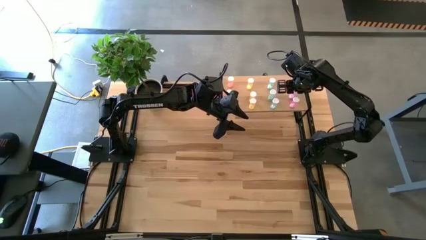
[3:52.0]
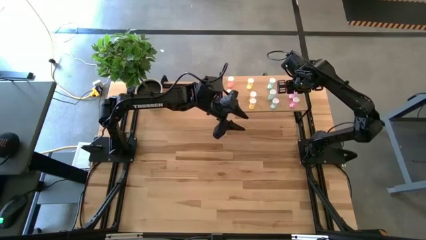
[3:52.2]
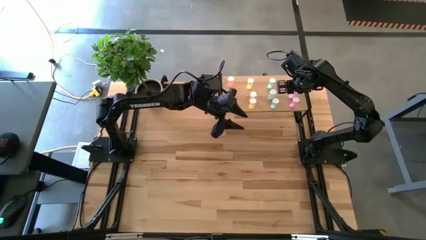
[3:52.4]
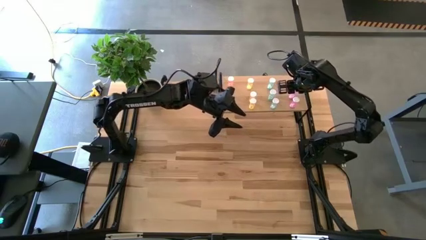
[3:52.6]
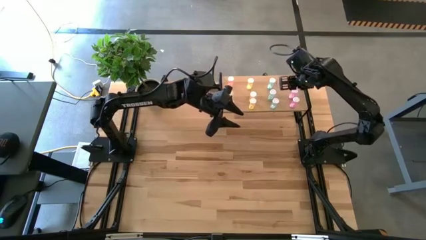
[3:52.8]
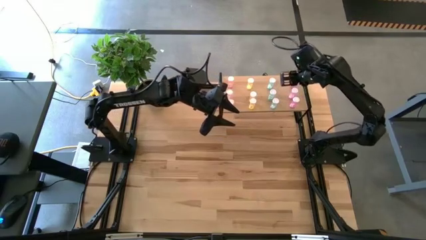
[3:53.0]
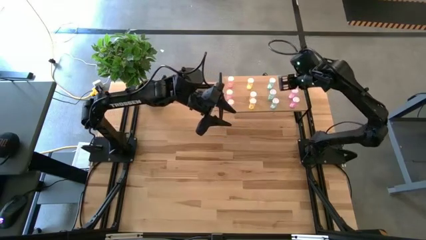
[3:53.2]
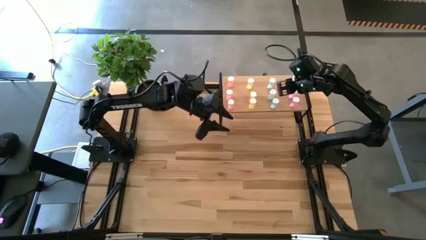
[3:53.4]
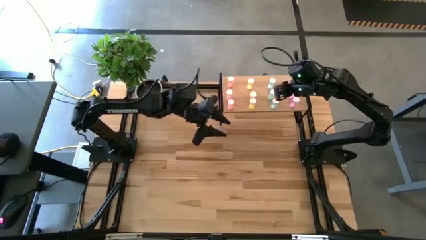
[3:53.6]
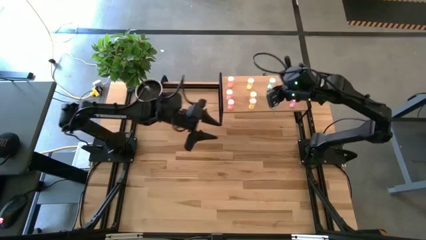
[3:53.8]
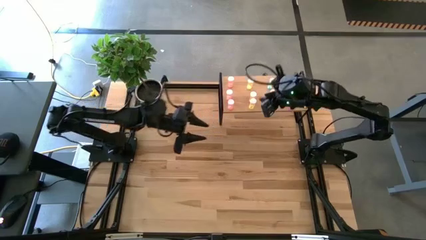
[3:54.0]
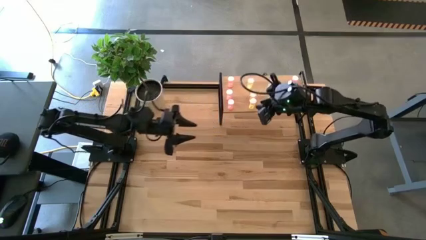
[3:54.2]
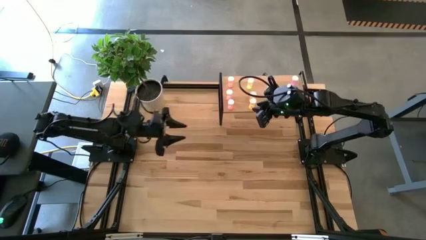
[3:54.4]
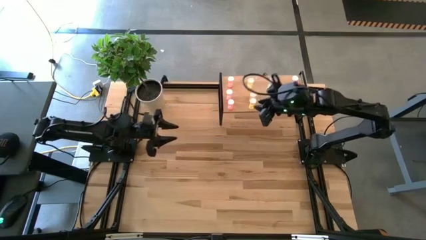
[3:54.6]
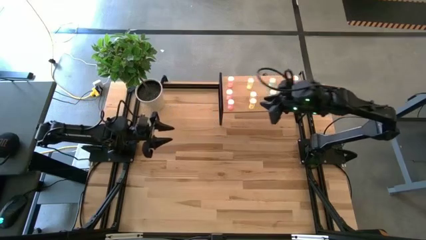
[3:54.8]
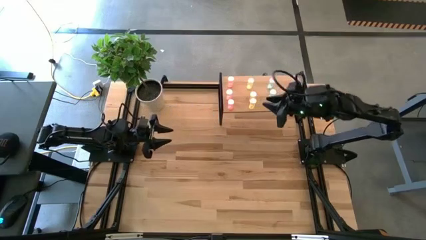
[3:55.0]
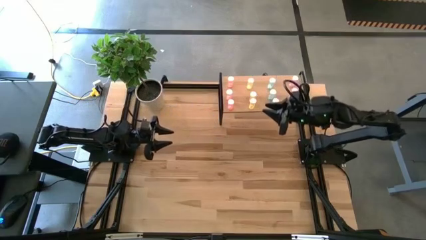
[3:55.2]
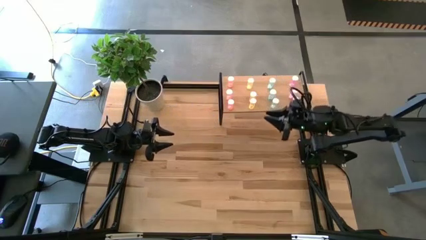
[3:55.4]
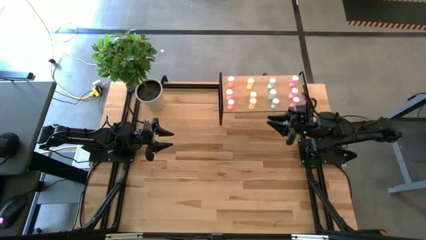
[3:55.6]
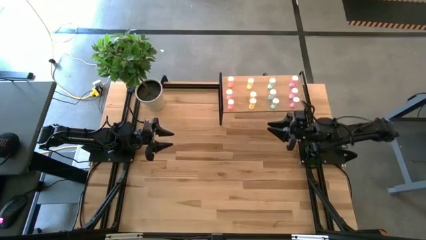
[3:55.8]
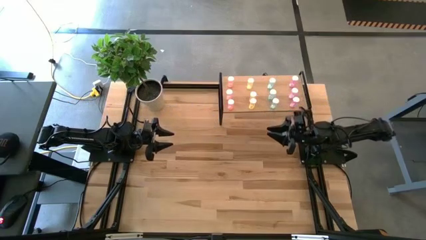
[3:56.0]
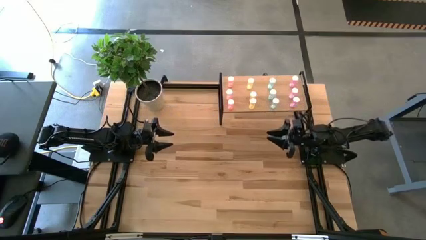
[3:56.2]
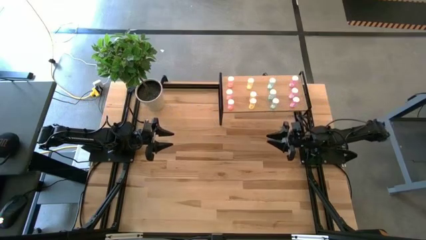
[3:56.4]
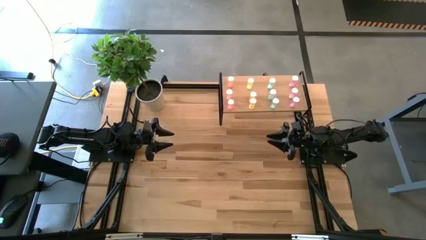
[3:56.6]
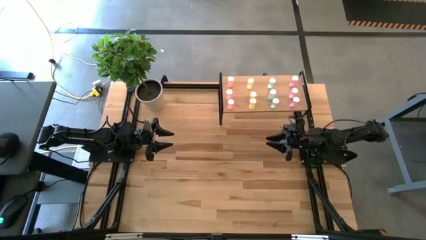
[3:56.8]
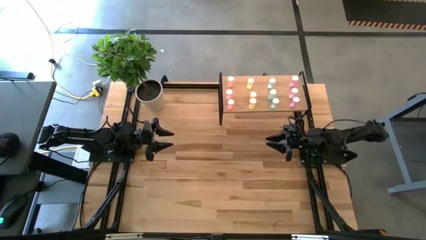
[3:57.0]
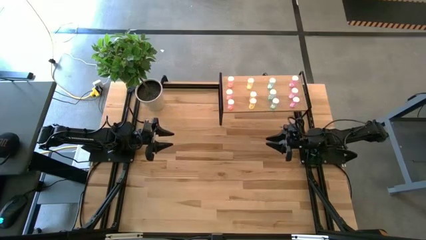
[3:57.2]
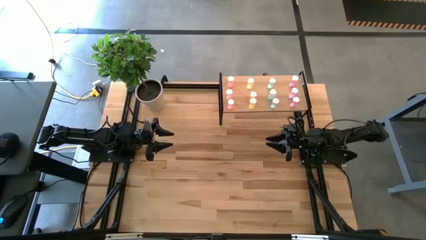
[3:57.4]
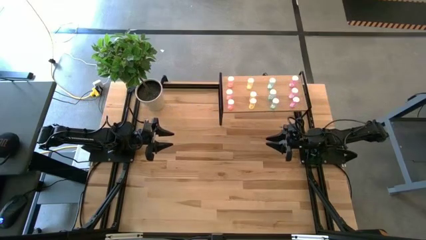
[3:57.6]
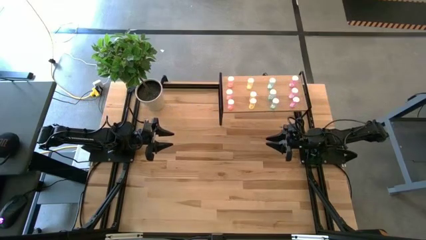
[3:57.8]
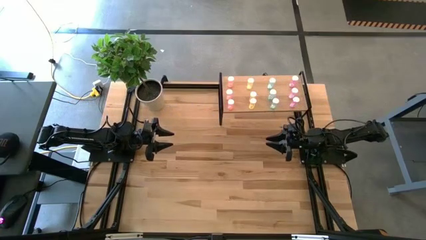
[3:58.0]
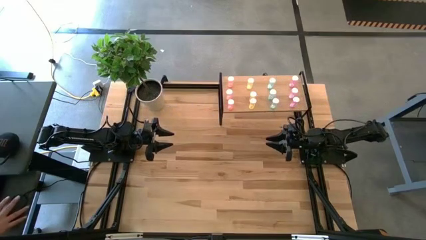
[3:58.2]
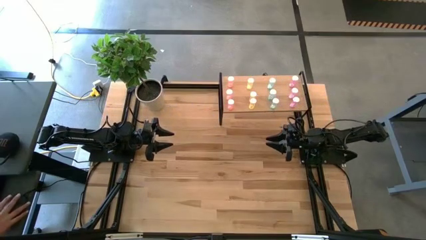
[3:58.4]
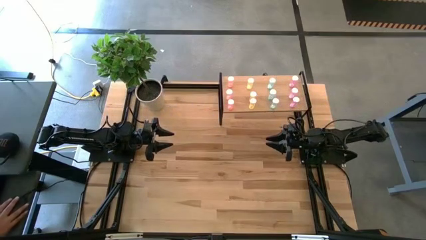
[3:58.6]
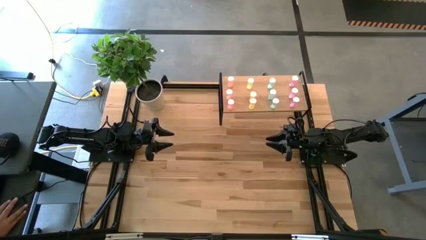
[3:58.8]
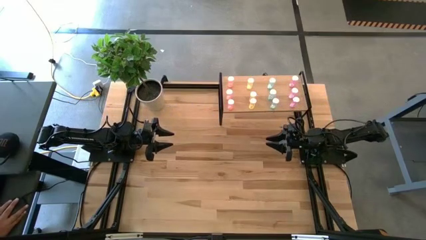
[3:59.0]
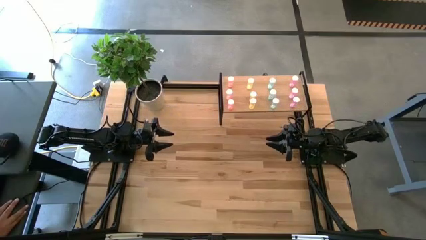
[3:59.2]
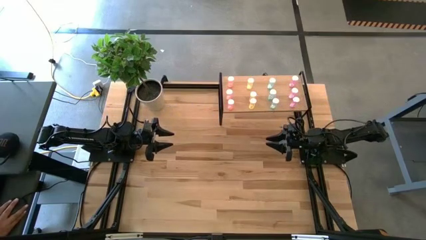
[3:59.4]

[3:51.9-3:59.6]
Task: Pick and place medicine bottles onto shelf by color
Return to Home Position

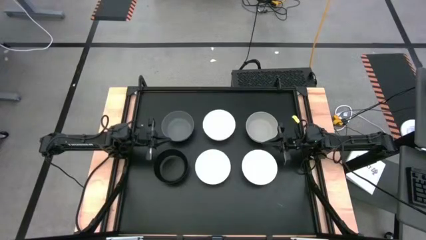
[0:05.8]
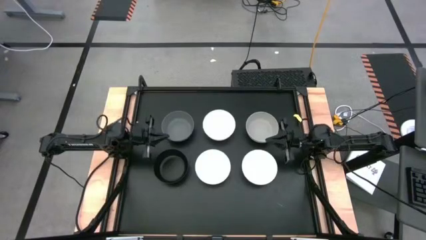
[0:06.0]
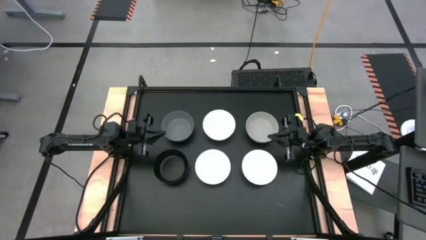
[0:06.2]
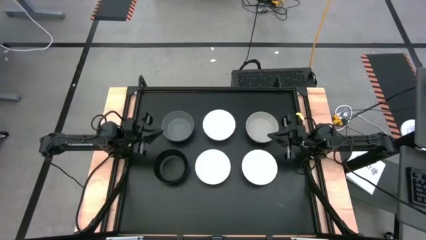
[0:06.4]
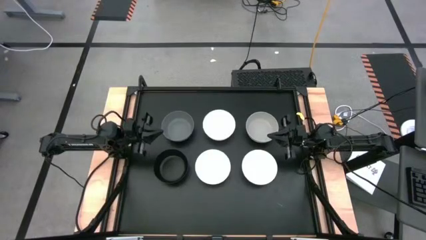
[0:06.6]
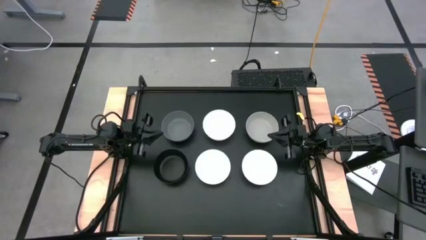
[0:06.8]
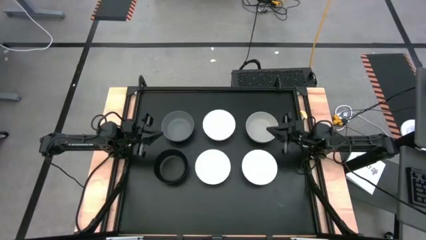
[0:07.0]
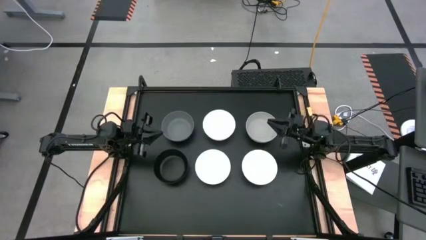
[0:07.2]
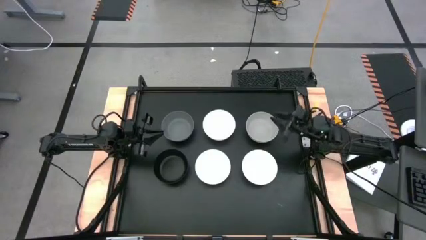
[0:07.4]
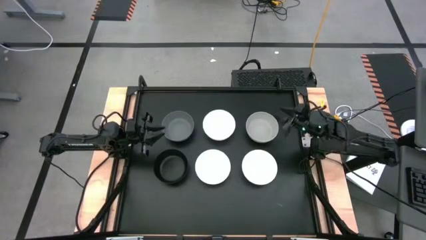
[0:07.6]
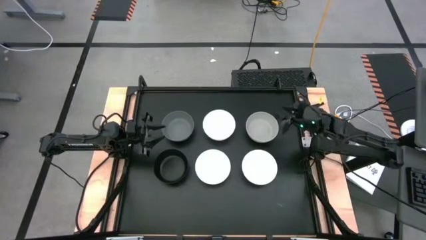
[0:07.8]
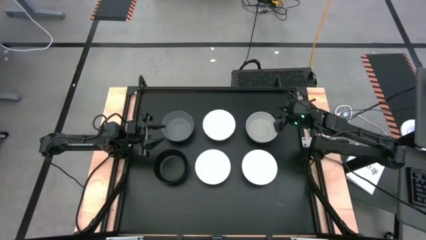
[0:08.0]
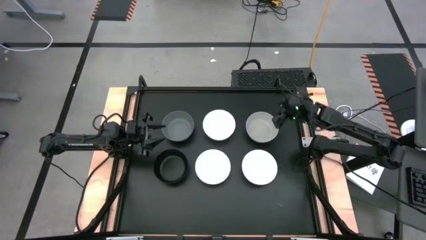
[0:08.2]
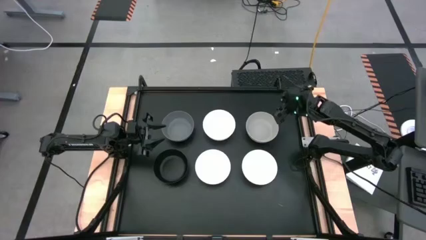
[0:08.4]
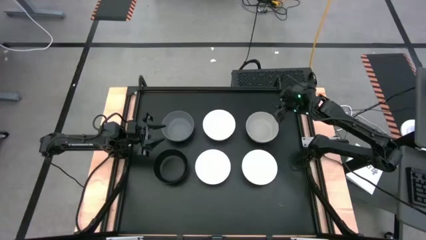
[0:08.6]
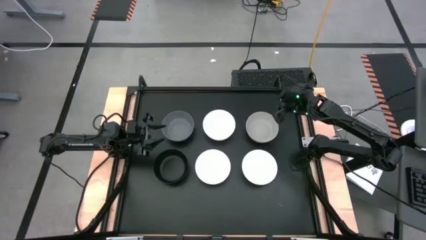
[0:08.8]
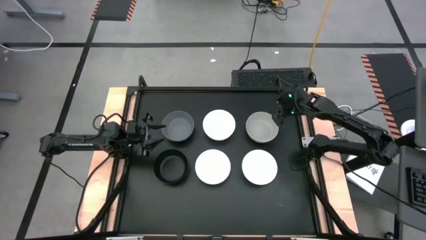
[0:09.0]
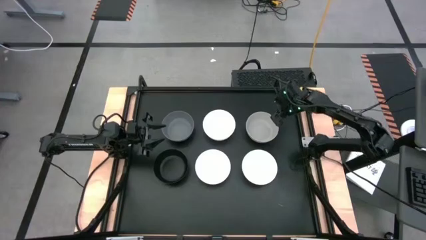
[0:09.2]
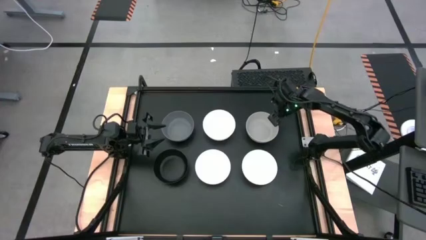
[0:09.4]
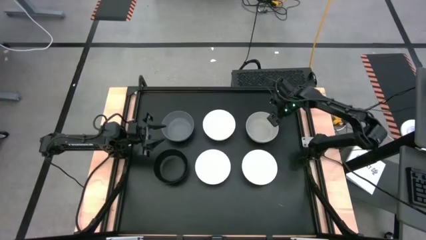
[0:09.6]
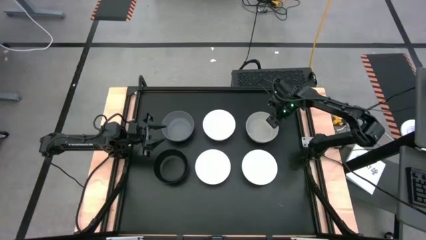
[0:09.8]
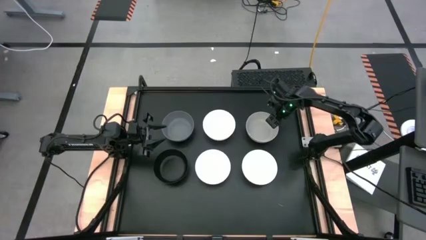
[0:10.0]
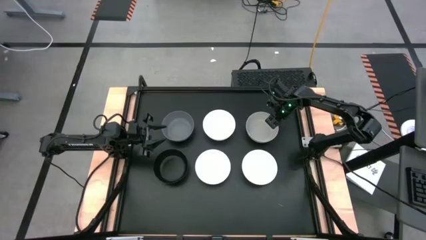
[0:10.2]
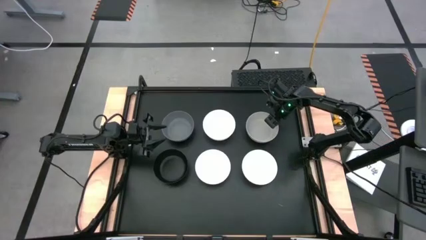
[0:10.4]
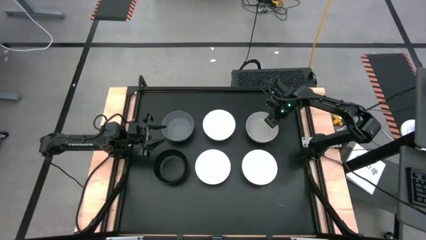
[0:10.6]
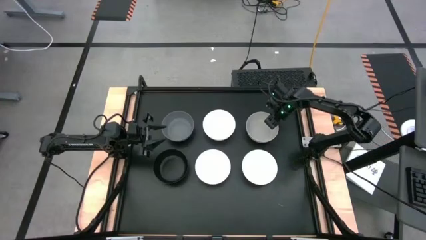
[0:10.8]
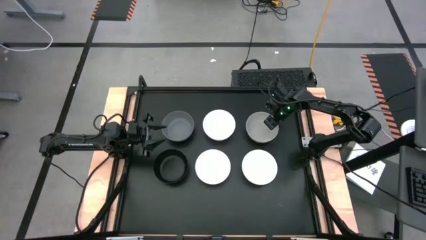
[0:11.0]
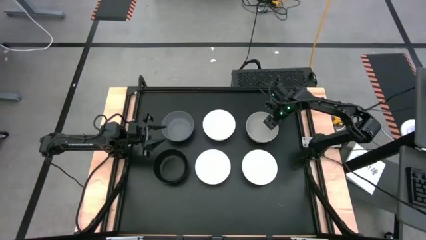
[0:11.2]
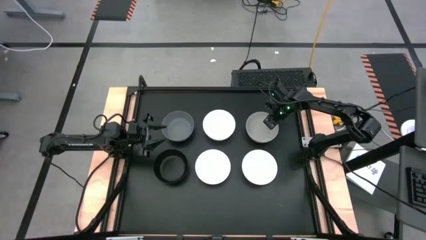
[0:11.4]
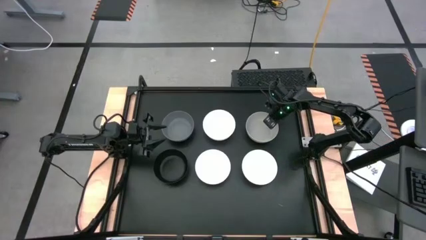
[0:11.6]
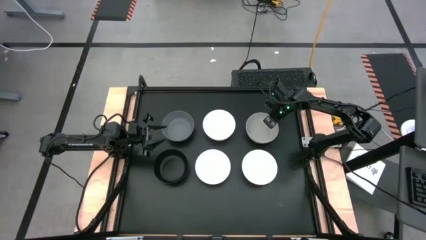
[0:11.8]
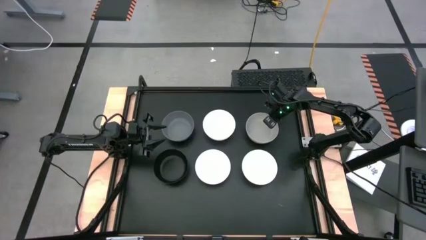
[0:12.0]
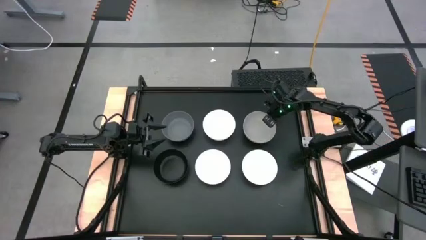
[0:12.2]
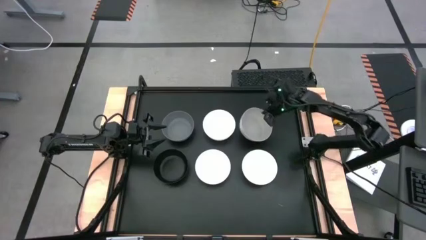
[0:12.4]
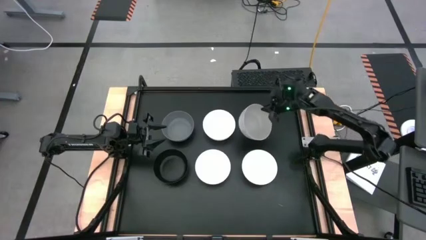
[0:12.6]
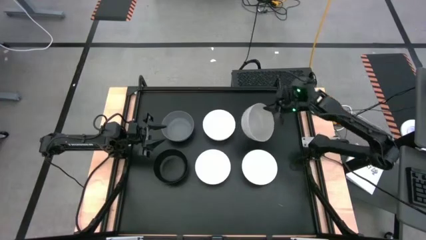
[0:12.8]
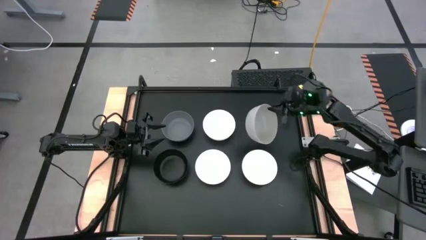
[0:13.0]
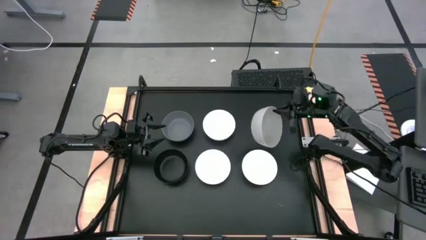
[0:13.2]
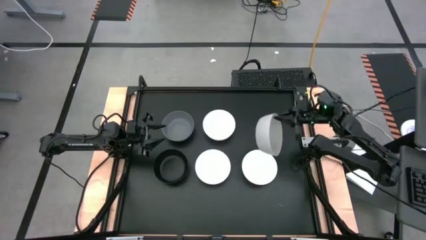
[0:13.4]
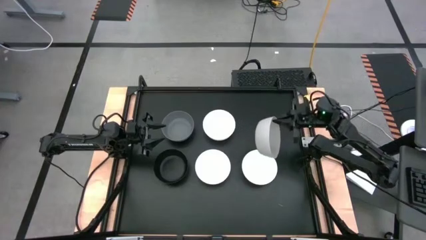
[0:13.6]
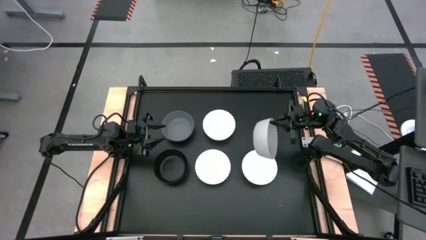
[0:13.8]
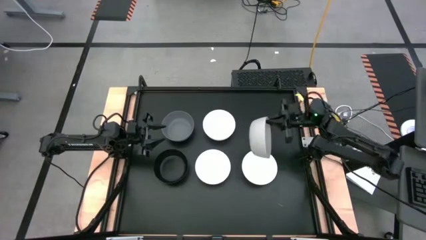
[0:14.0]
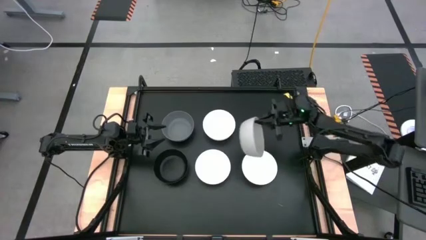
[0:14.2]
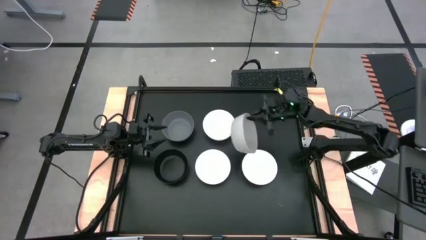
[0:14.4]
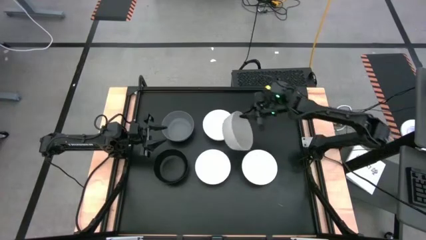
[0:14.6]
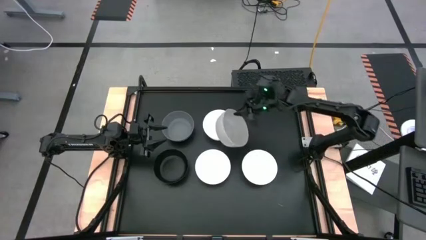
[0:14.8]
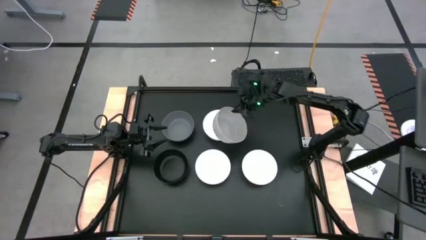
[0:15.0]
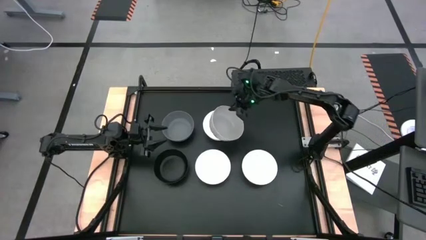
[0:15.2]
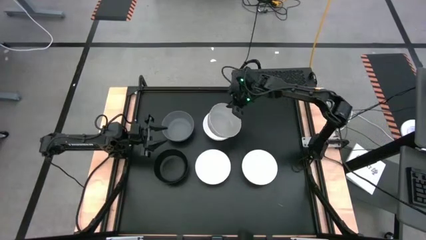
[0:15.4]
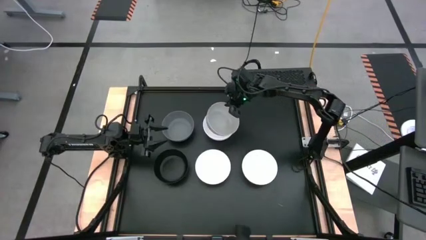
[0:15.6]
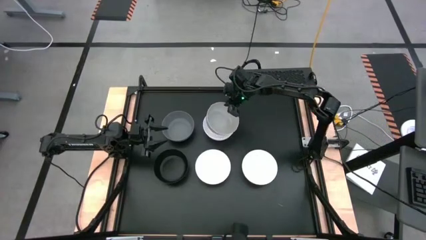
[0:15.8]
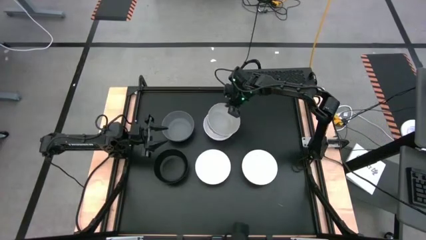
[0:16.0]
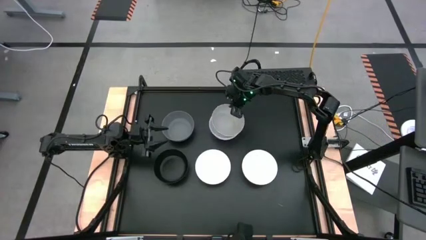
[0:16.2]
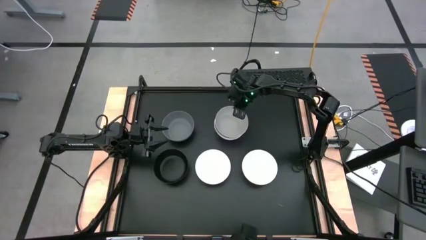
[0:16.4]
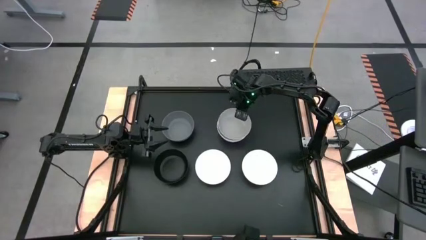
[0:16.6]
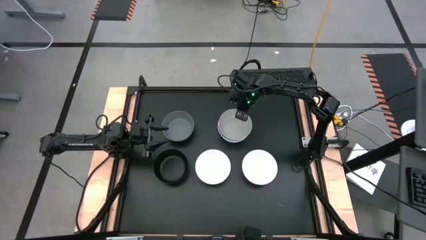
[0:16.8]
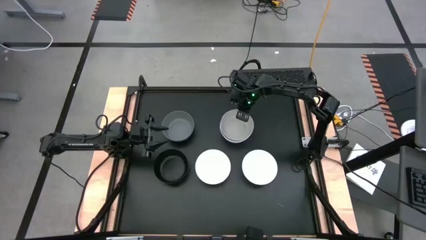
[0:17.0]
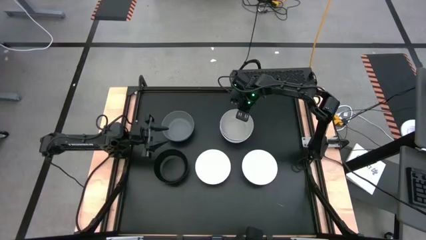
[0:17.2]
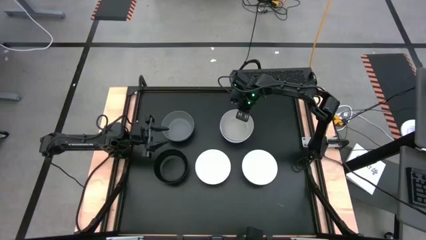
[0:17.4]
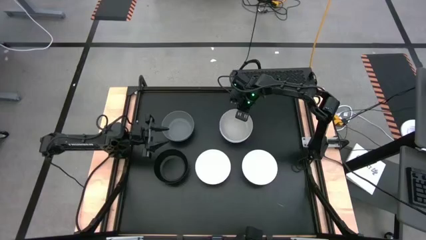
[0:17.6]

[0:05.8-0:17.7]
Task: Nest bowls inside each other
Stack the right light grey bowl on top of the top white bowl
